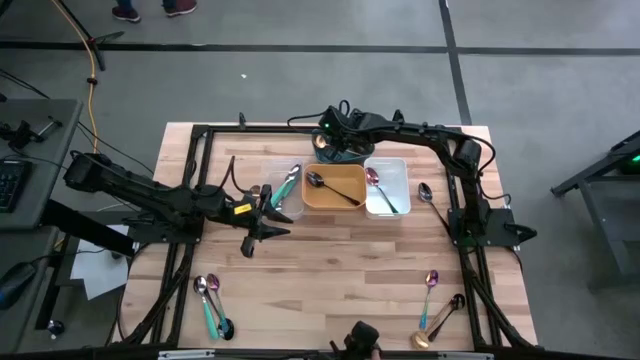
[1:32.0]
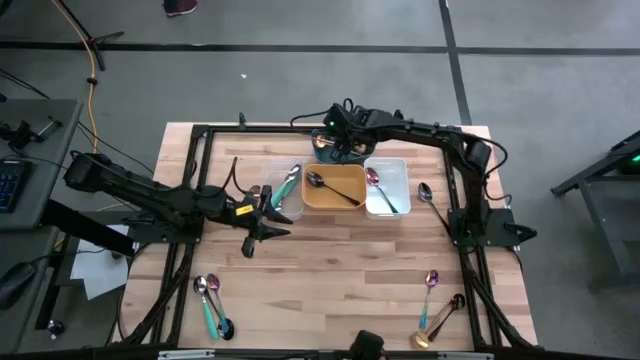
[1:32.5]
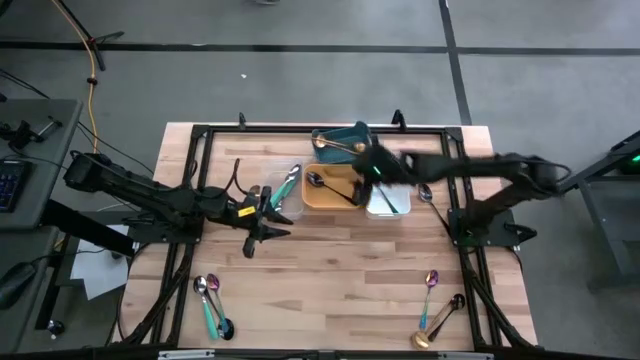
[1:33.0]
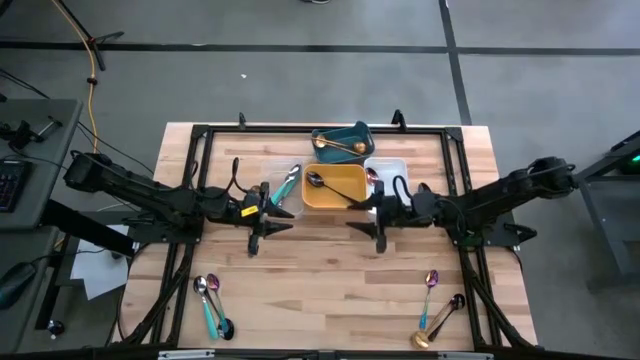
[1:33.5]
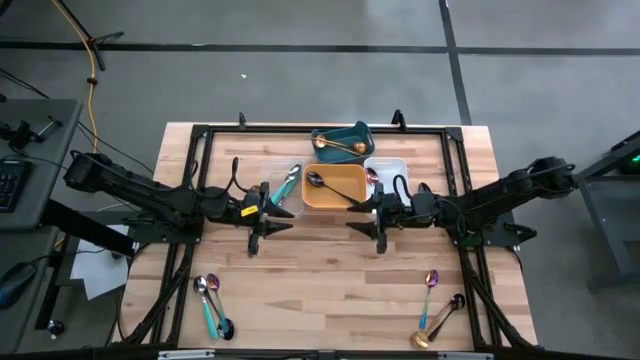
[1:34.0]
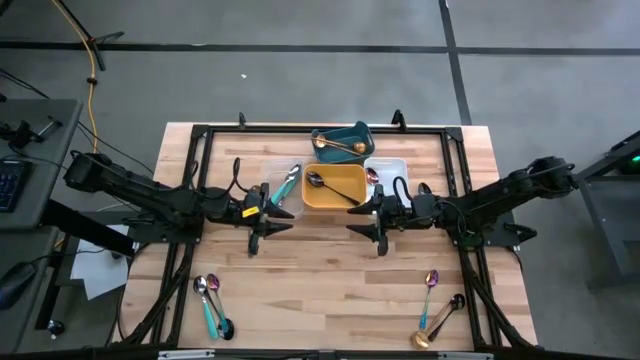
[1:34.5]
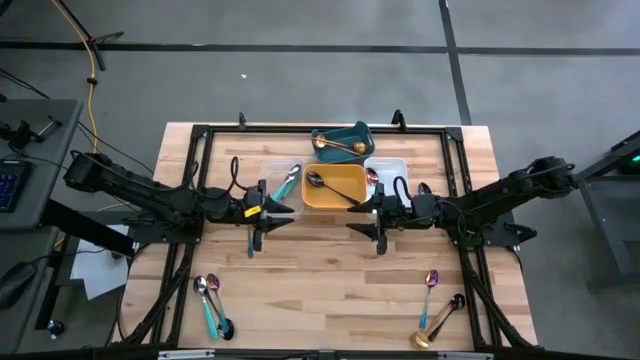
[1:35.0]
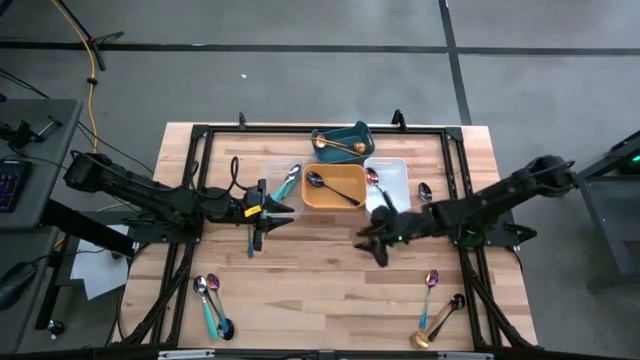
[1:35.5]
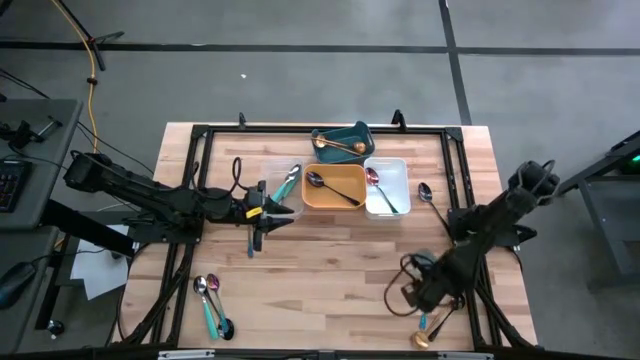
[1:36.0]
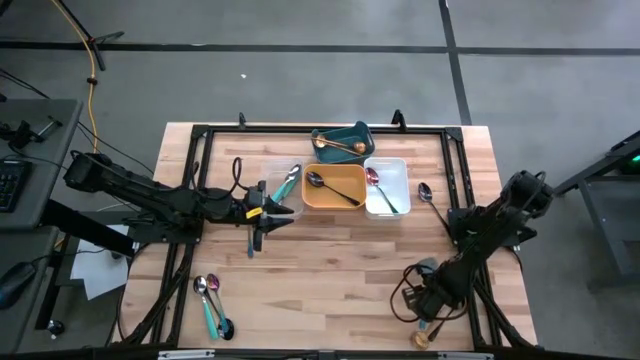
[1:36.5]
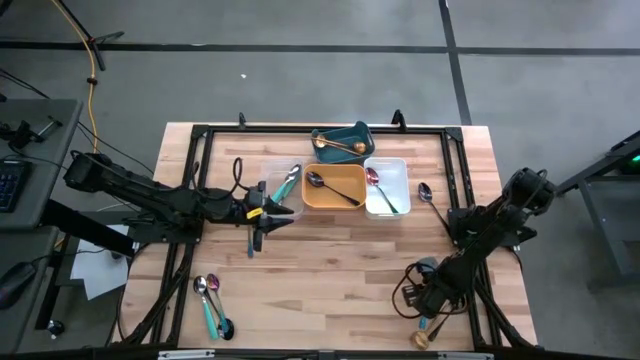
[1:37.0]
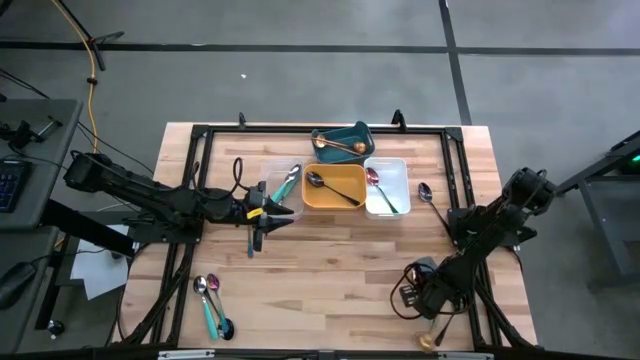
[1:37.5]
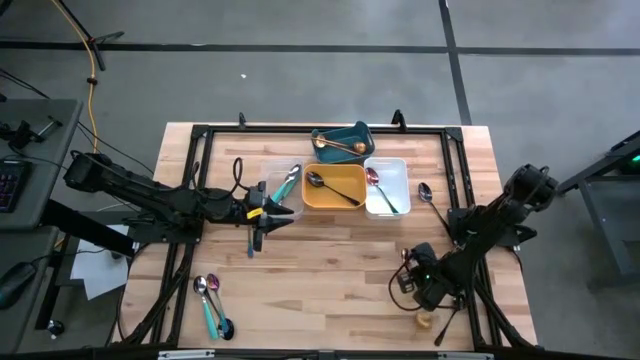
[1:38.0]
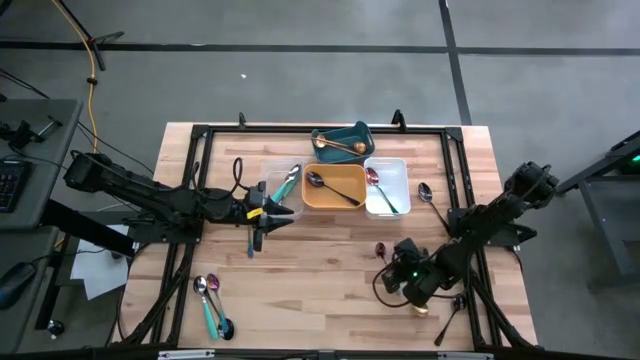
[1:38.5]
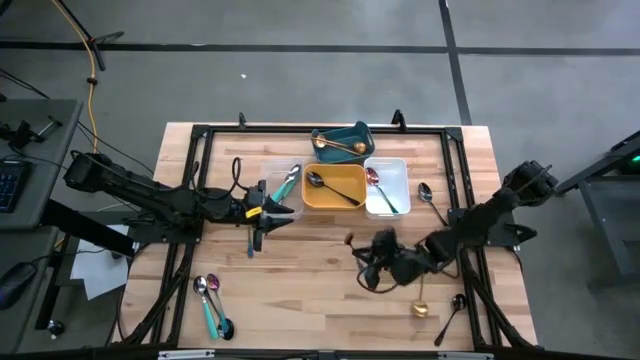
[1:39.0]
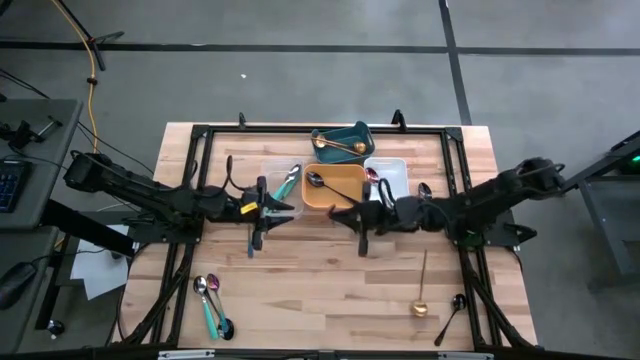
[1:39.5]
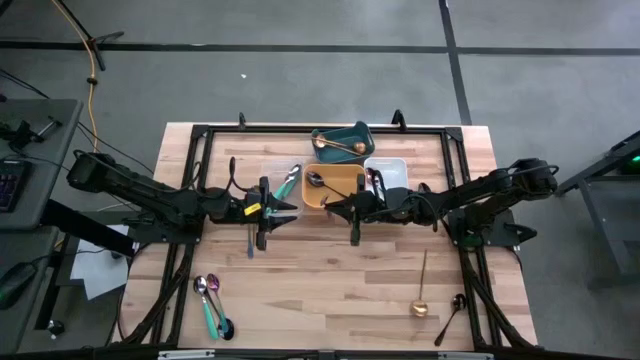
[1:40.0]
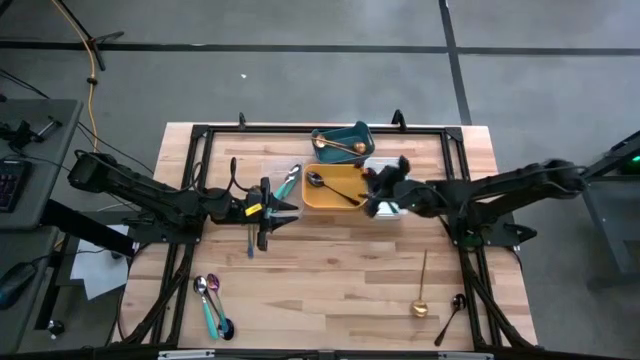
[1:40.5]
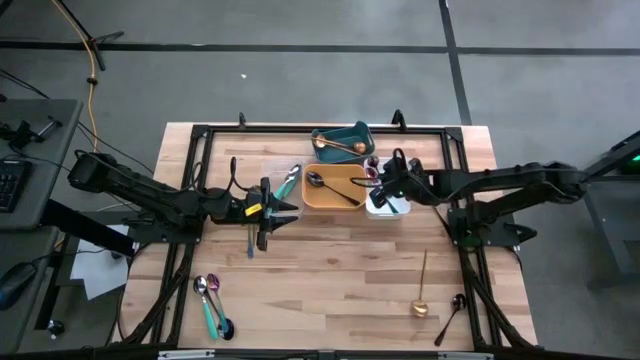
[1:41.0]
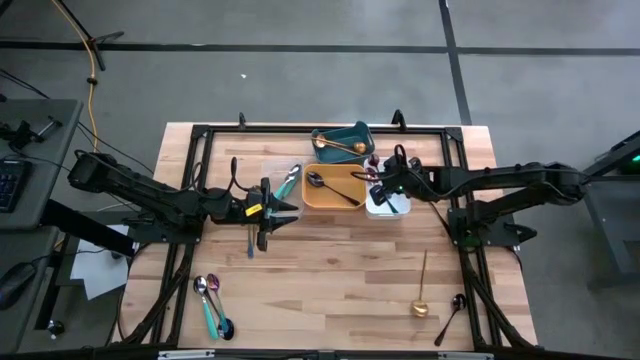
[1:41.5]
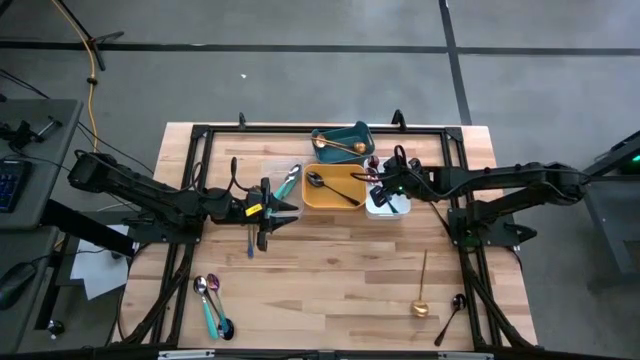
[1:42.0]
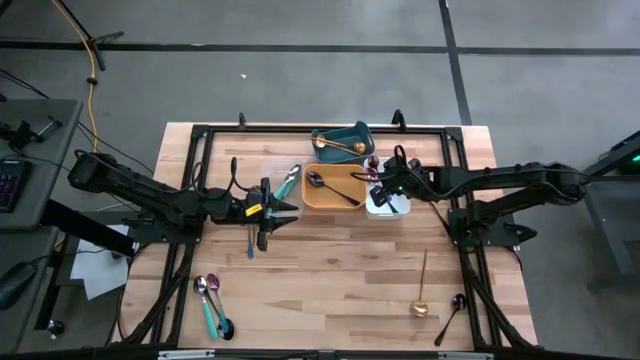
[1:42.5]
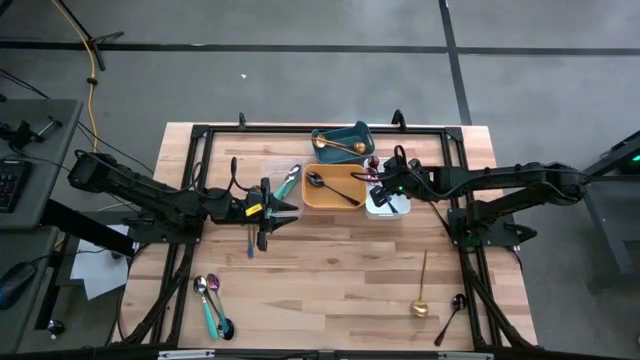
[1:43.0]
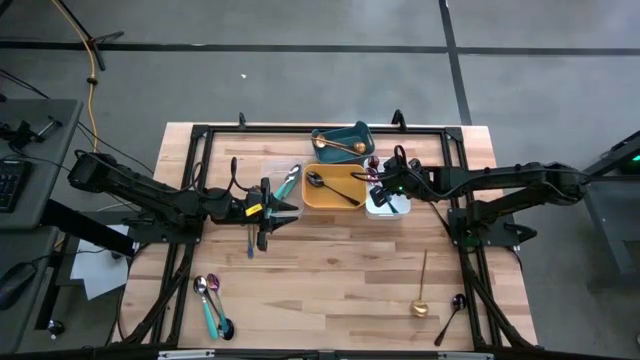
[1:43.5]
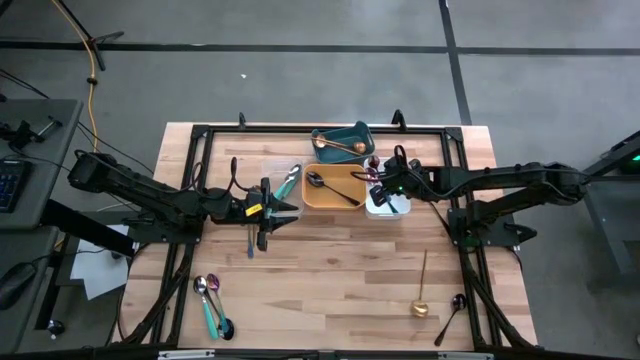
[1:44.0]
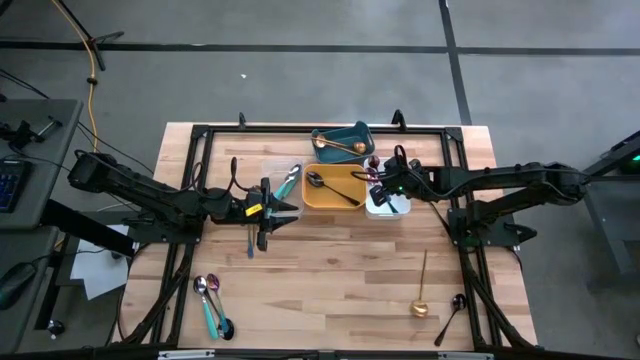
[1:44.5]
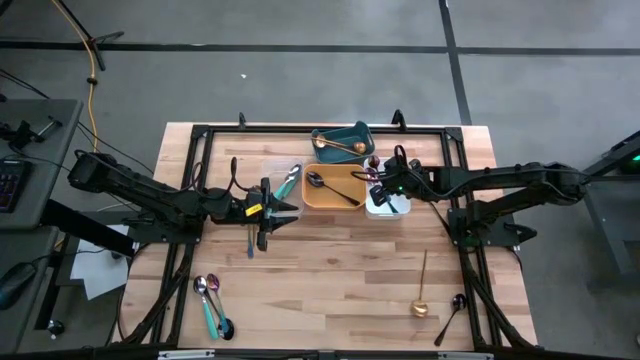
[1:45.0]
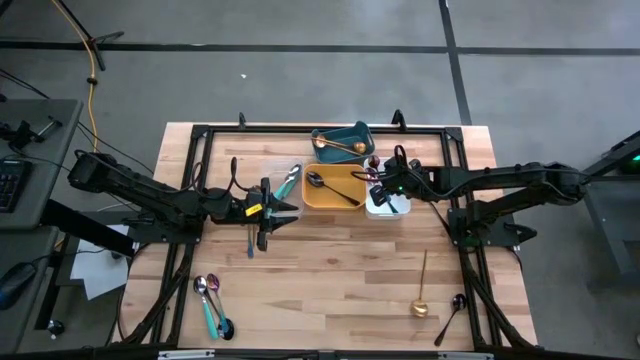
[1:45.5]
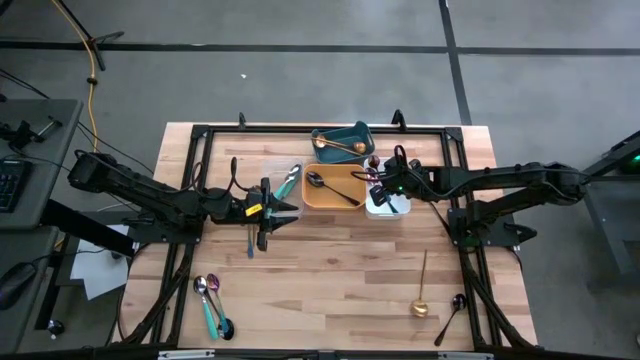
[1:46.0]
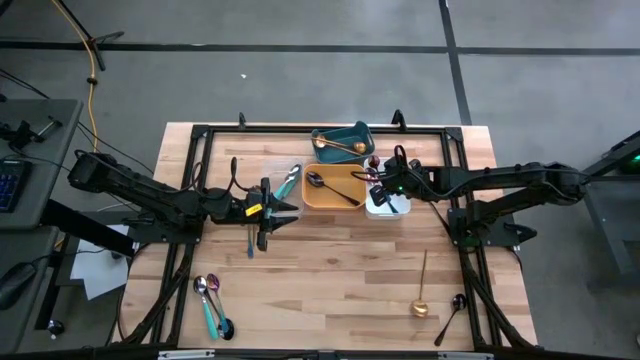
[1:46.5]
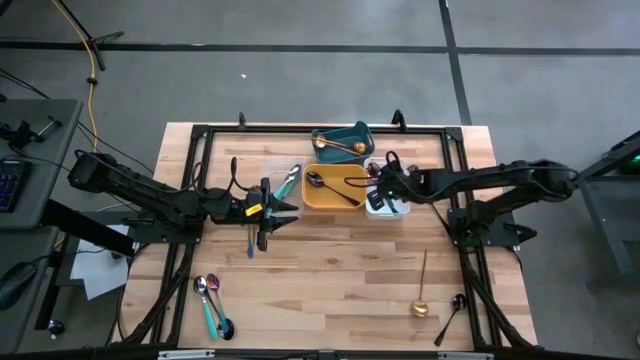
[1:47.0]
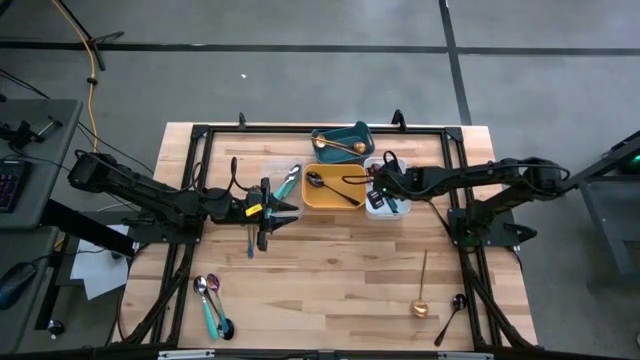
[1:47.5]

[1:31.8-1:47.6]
Task: Sort silverware by color (type)
Put the distorted-color spoon into the white bin

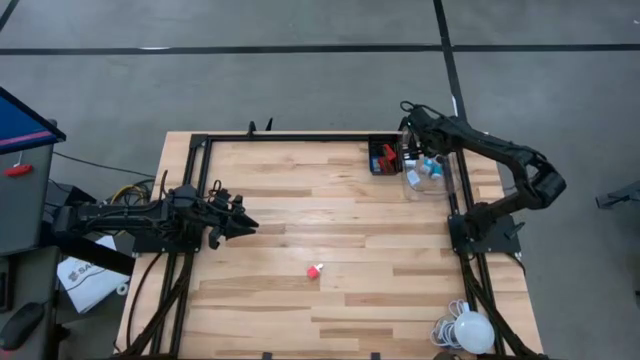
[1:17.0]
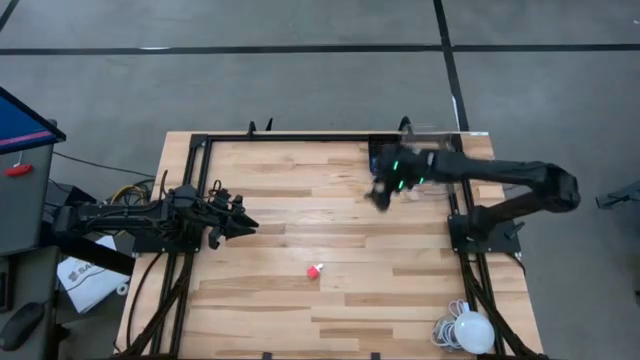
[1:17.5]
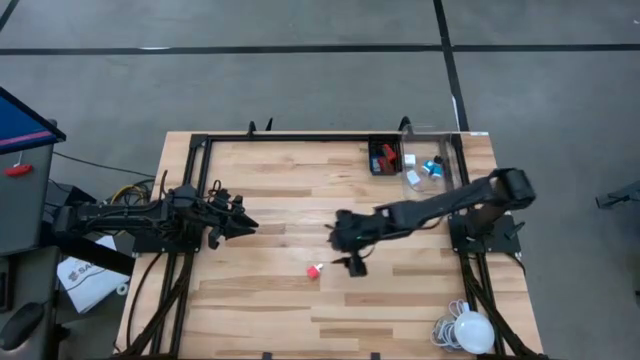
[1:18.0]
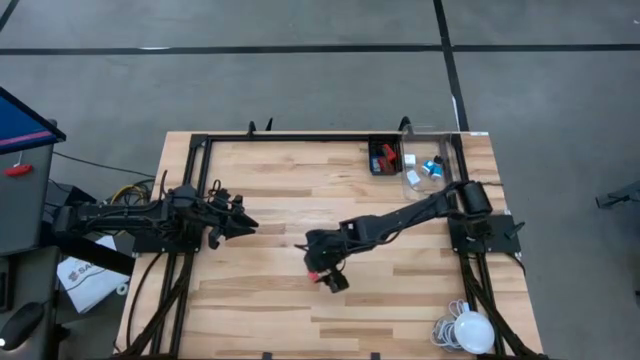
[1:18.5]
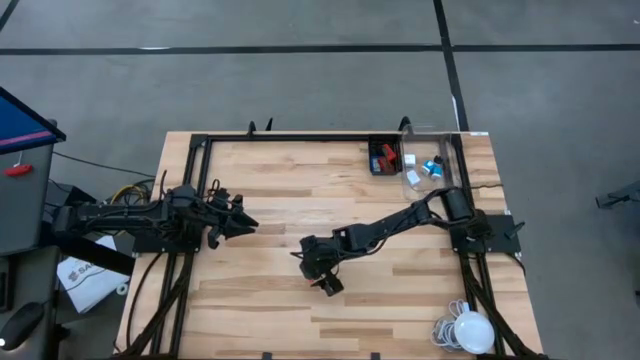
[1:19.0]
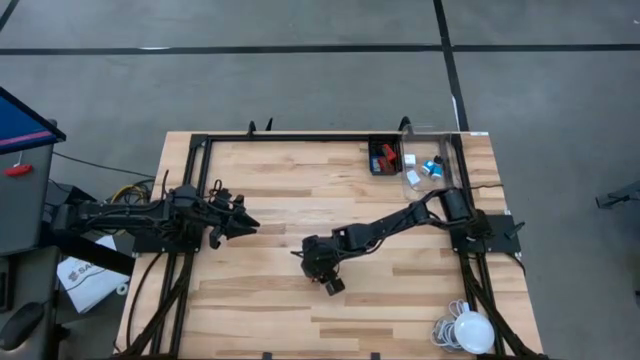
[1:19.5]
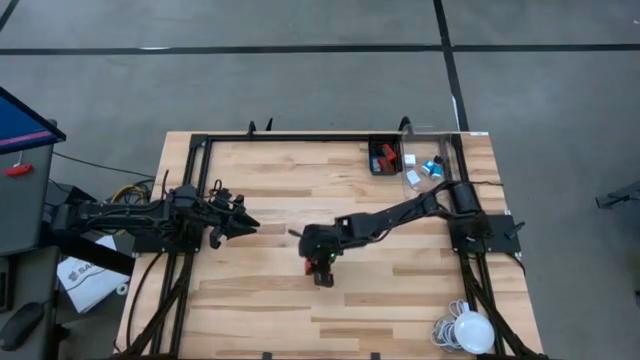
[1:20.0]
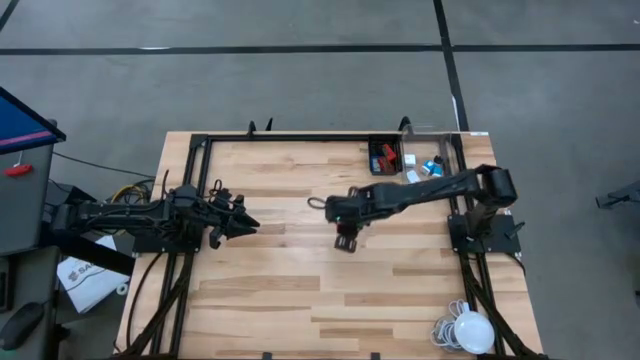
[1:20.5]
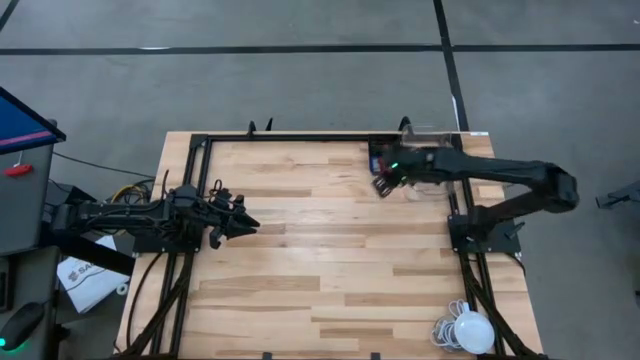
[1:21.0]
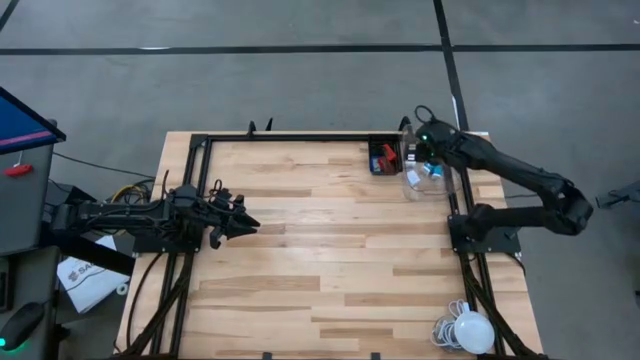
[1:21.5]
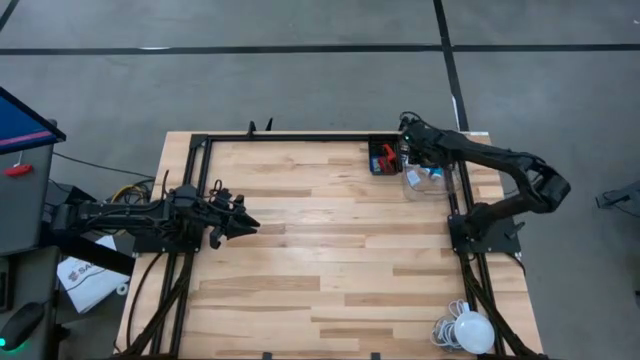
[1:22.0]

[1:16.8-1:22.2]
Task: Pick & Place Office items
Put the pink and white charger adapter into the transparent bin
